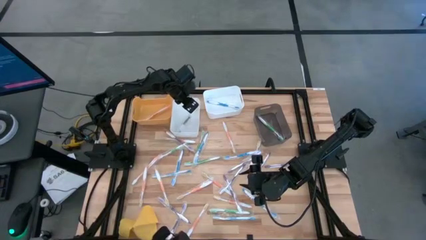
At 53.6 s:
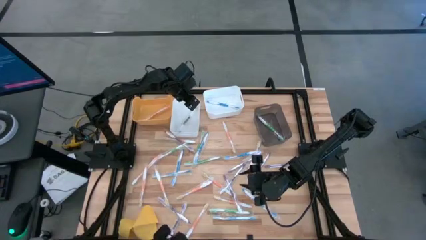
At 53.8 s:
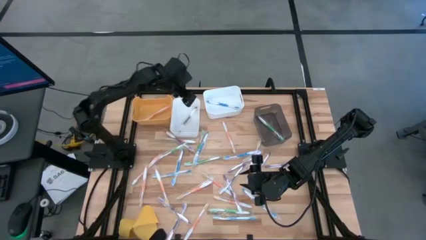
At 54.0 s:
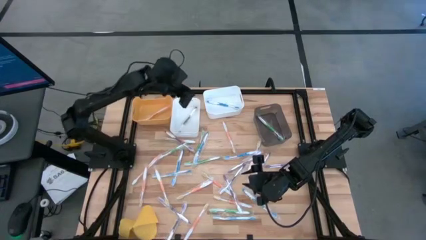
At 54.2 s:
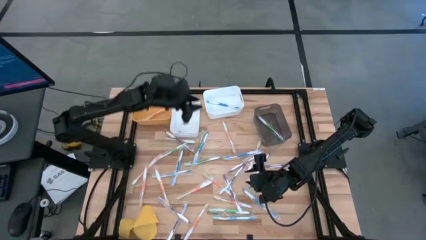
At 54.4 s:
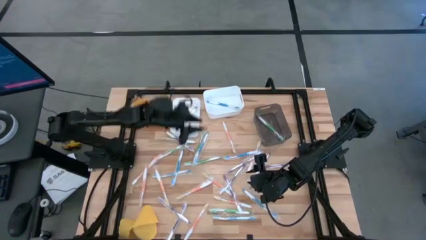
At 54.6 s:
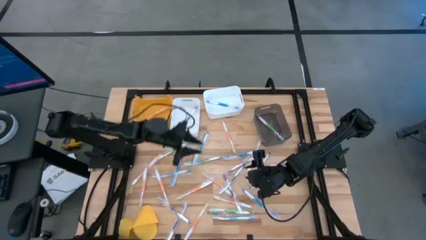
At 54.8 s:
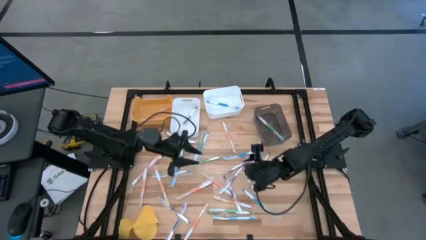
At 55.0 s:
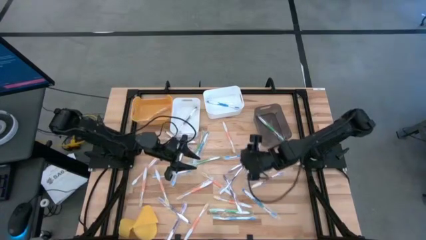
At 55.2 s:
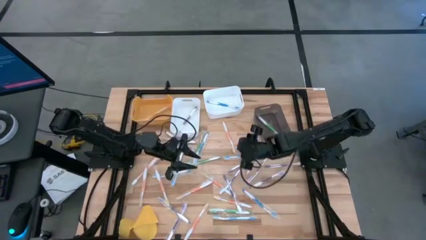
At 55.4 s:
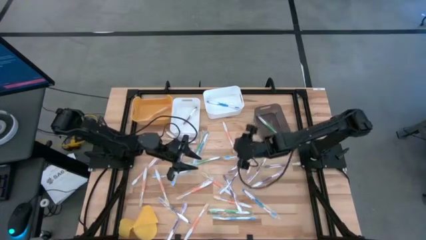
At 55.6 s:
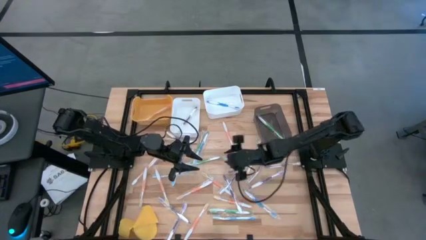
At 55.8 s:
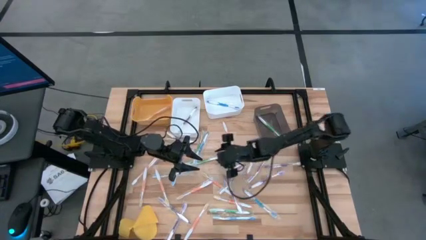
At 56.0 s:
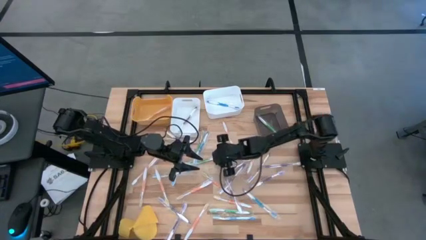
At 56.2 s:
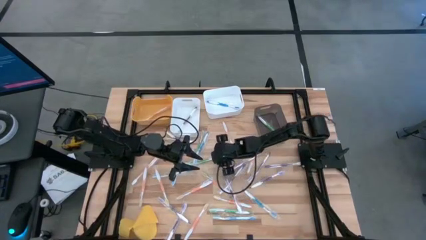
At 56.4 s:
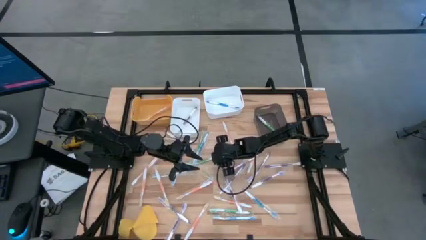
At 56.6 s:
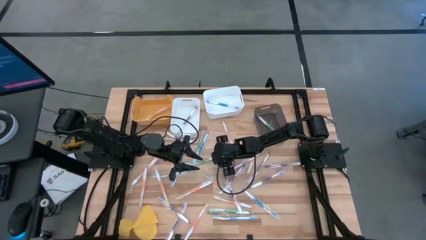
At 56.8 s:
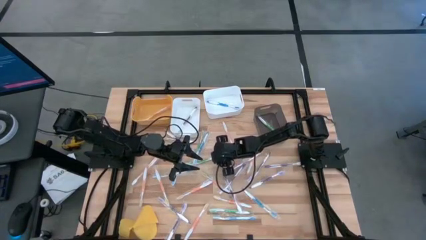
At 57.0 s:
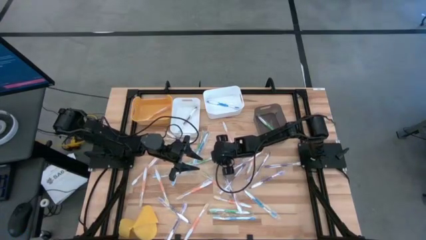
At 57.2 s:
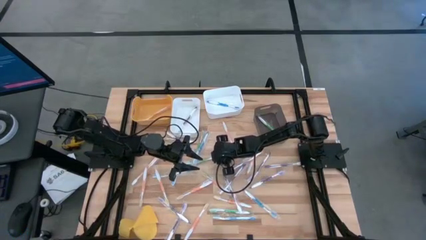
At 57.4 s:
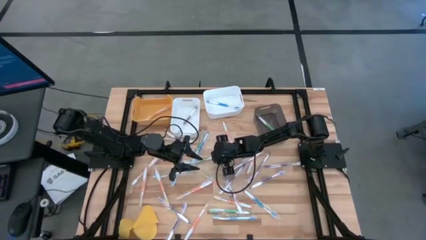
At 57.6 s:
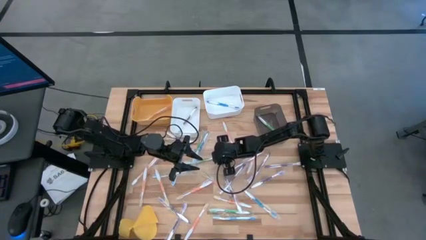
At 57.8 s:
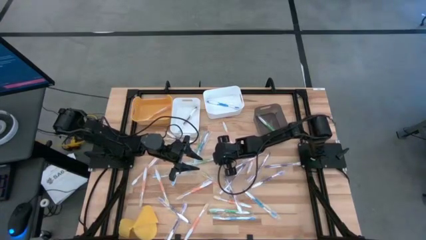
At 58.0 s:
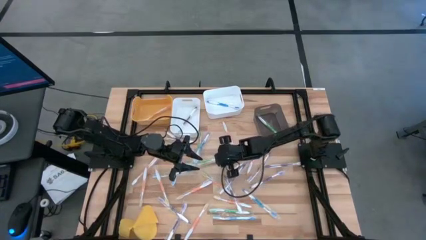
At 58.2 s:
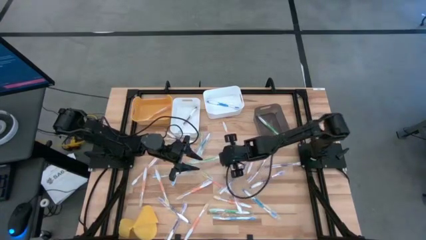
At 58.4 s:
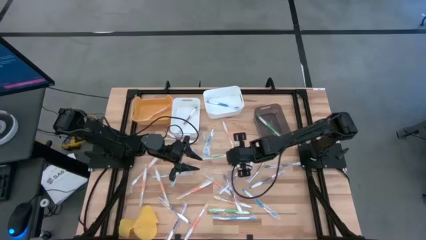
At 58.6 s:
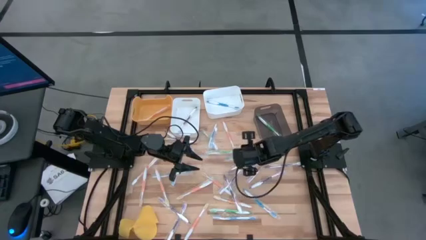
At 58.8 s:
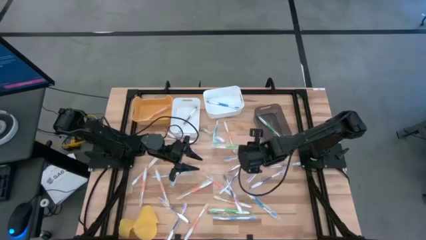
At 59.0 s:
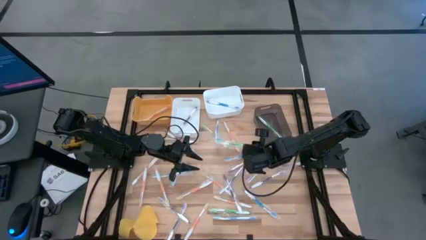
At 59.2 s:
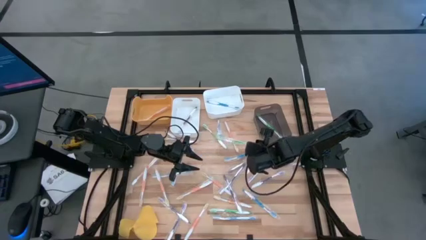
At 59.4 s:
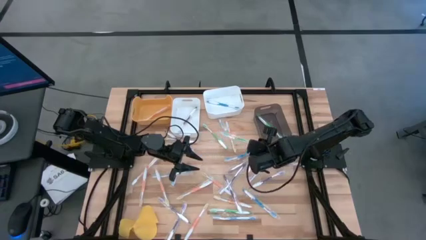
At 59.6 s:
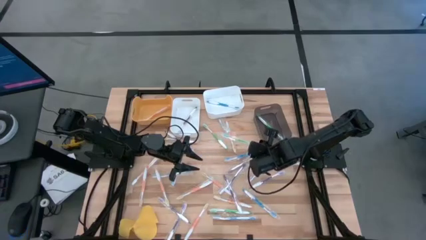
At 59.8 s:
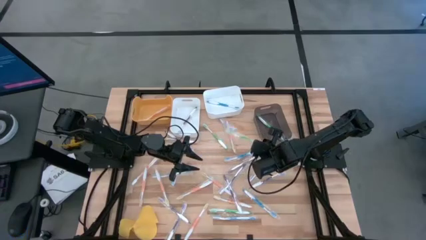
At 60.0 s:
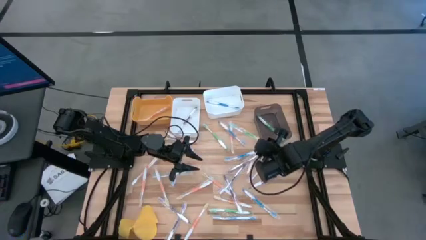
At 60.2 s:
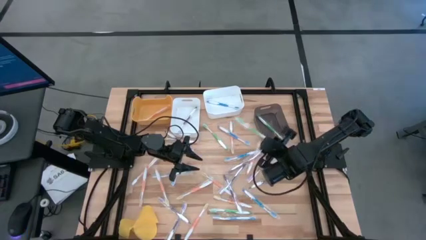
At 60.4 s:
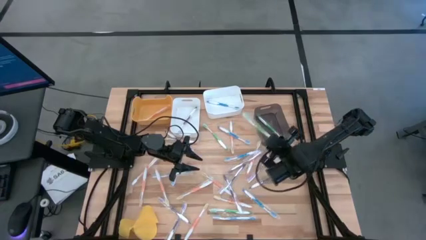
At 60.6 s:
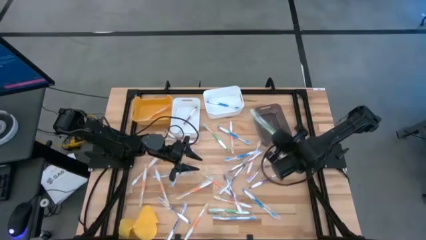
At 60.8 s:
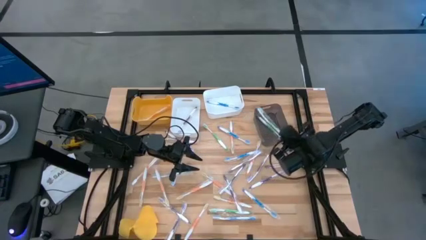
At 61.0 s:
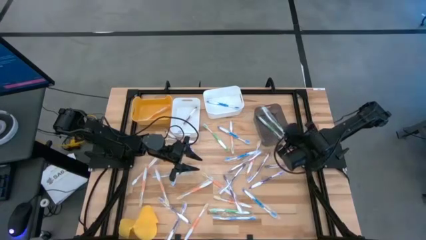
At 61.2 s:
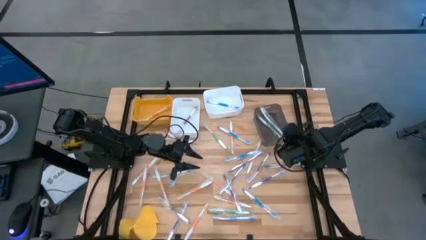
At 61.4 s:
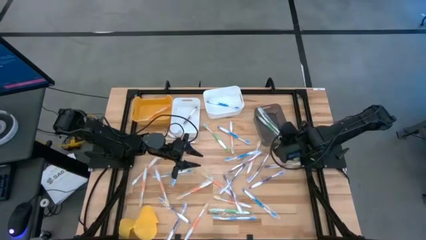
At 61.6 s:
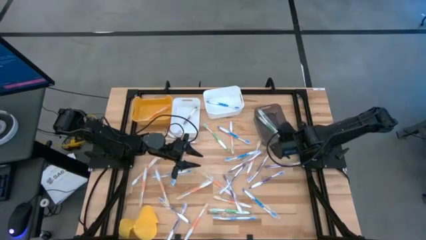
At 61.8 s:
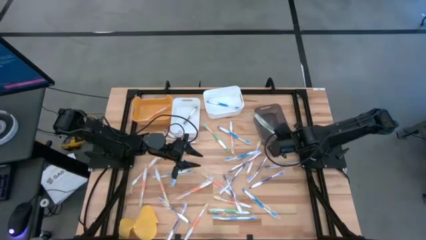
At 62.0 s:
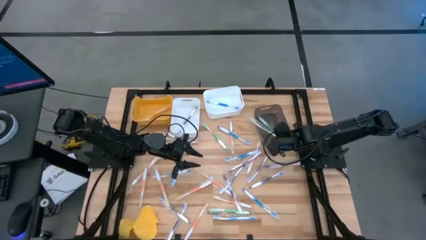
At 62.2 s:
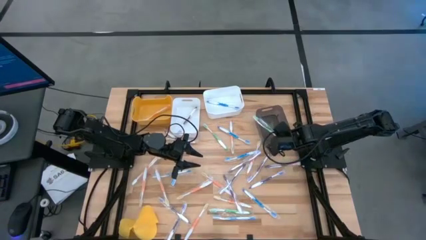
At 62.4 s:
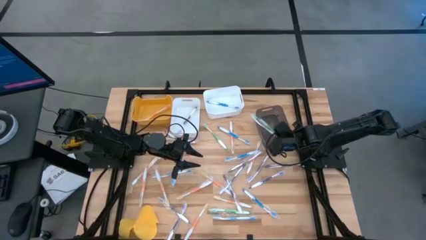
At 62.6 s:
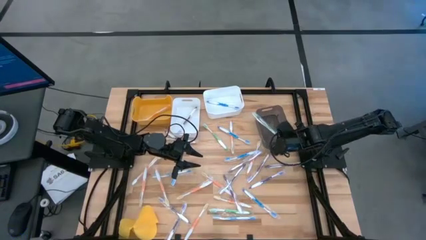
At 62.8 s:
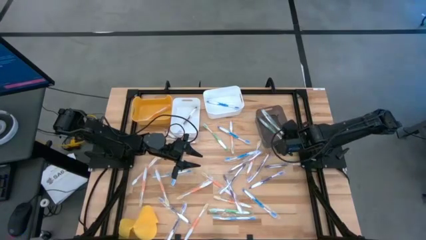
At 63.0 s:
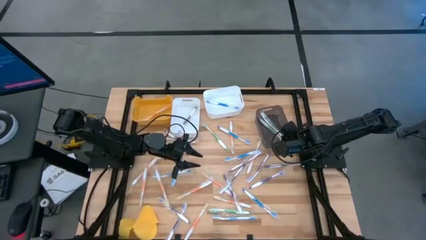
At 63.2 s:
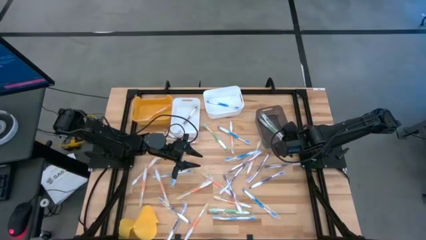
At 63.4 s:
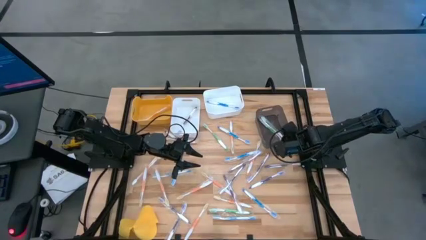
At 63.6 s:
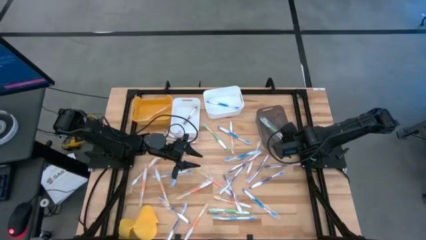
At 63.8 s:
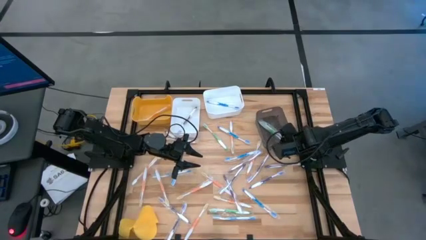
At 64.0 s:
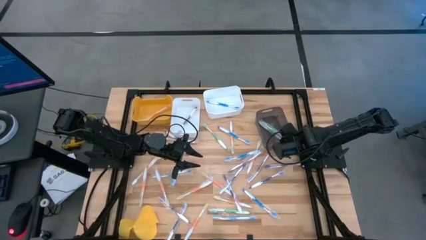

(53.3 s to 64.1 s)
Task: Pick & Place Toothbrushes
Put the green toothbrush into the black bin

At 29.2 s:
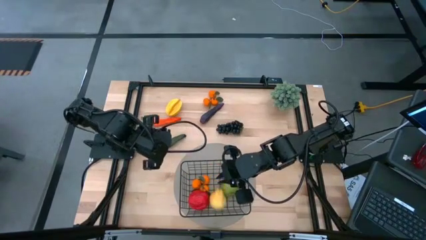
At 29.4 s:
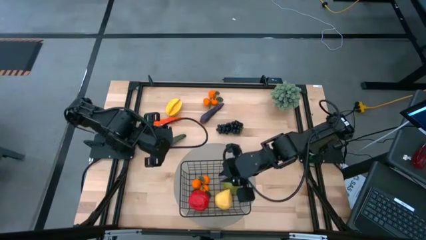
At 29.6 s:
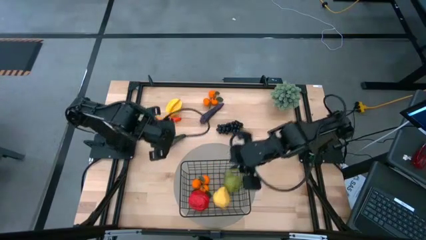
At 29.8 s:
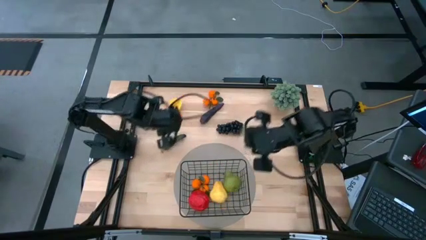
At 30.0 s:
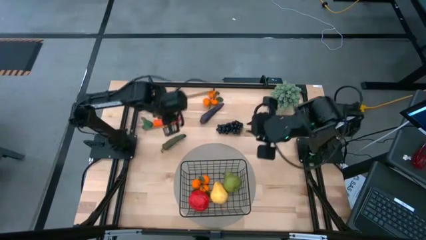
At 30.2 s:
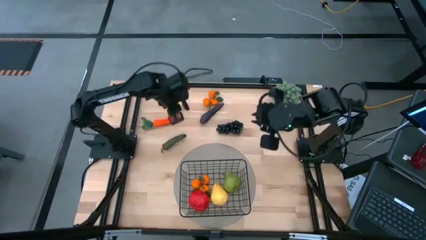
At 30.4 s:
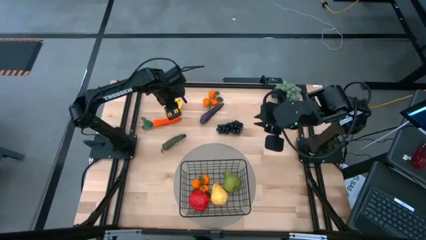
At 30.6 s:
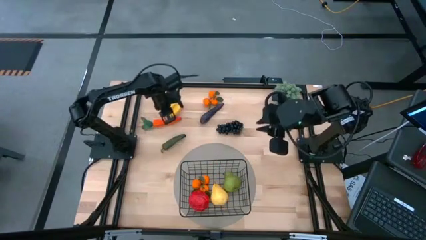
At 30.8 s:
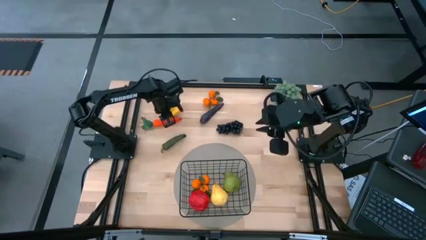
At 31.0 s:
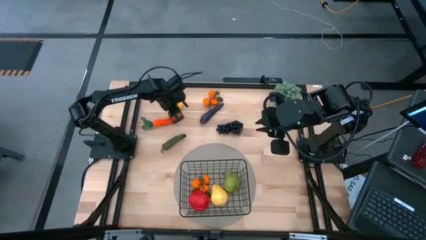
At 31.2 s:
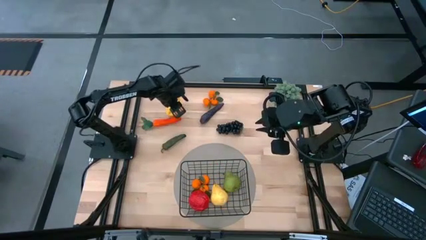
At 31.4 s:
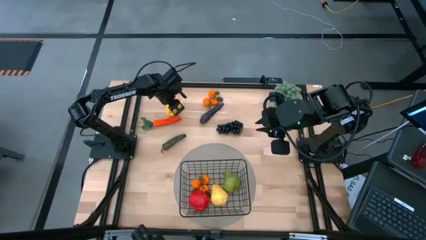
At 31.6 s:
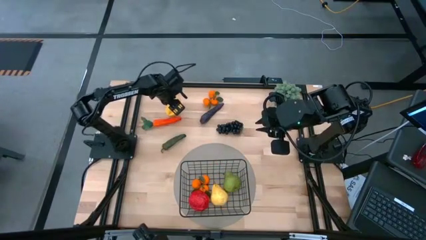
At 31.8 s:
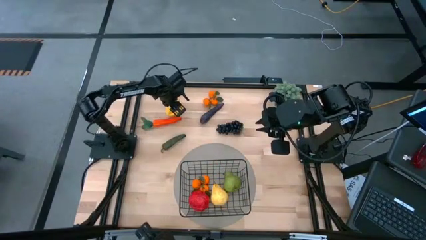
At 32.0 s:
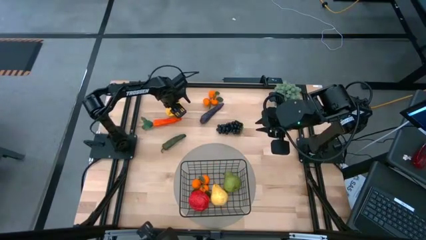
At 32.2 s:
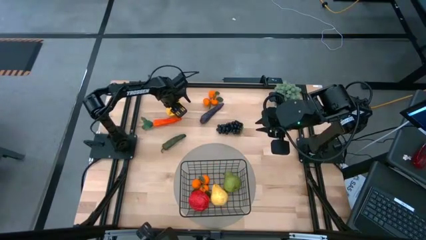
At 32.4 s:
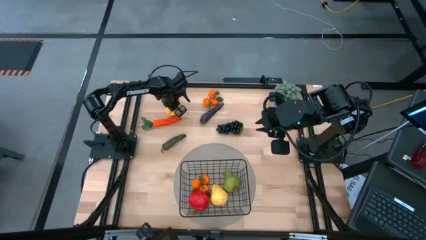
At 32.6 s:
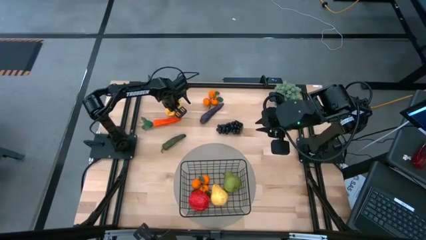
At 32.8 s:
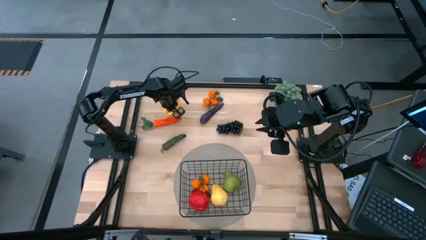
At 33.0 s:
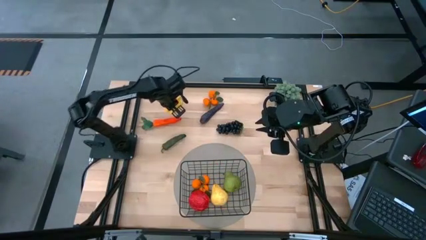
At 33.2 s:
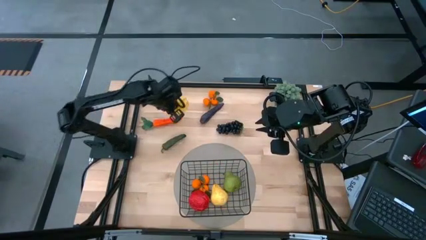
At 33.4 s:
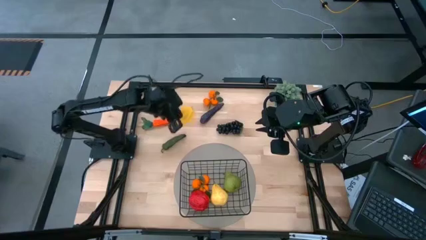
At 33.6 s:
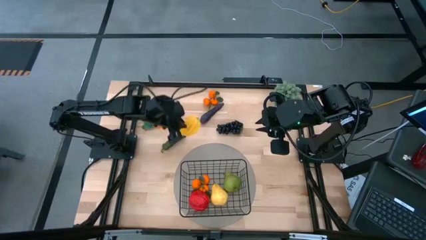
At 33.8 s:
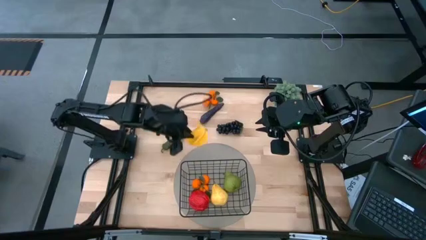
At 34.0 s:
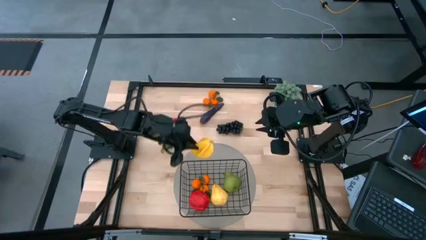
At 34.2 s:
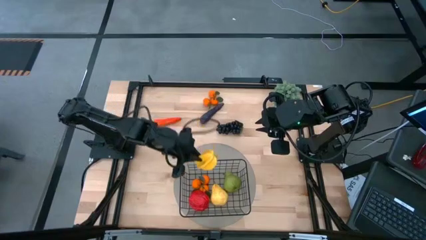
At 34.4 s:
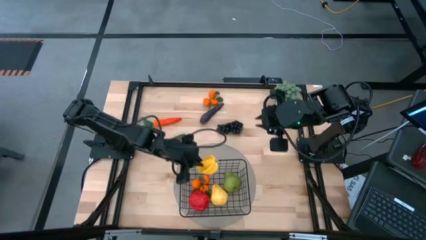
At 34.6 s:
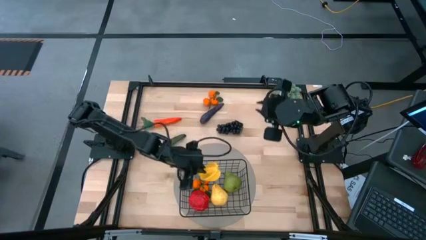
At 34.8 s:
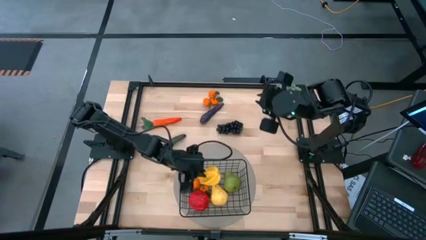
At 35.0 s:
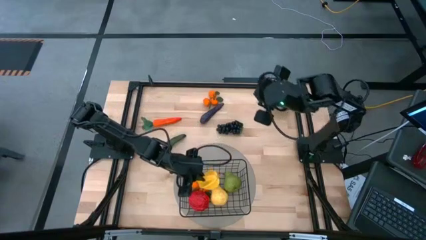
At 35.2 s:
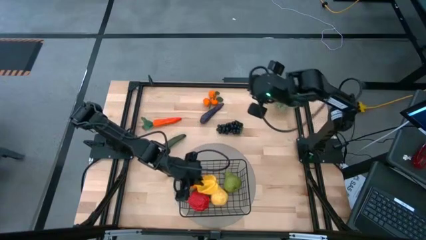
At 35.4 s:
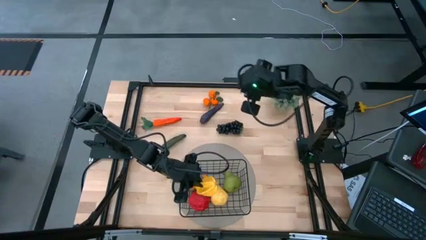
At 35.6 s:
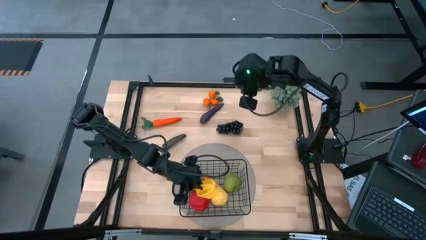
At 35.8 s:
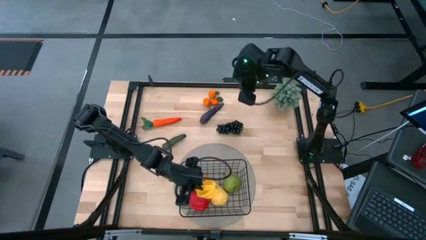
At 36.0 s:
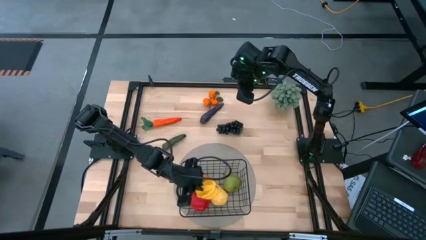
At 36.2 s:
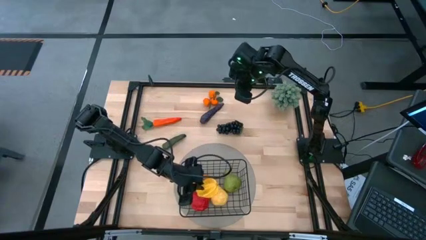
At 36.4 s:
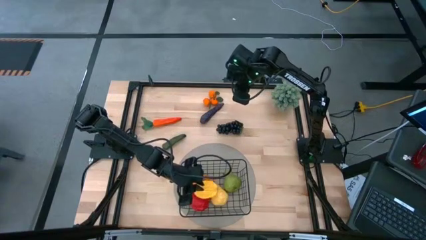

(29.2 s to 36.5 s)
Task: Build produce basket
Put the starfruit into the black wire basket
